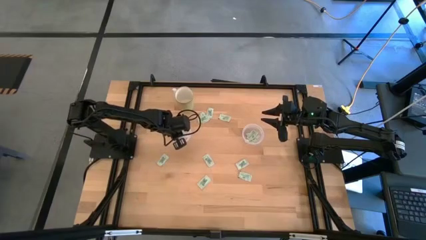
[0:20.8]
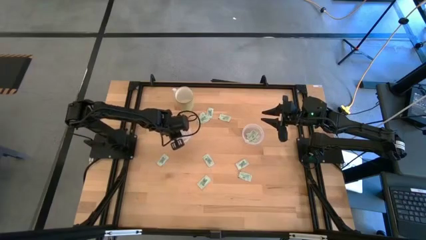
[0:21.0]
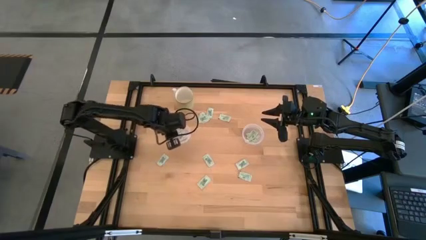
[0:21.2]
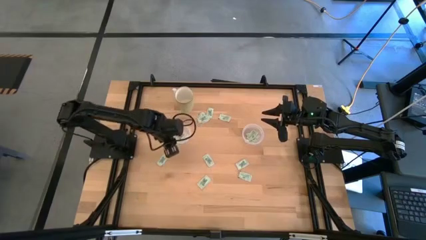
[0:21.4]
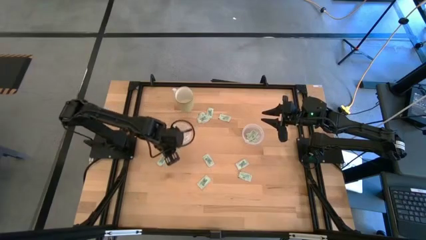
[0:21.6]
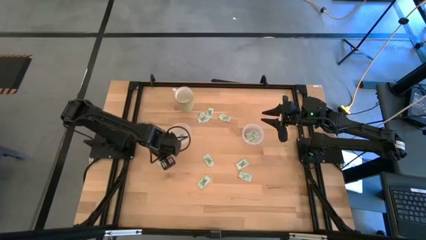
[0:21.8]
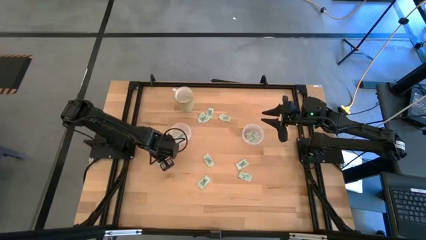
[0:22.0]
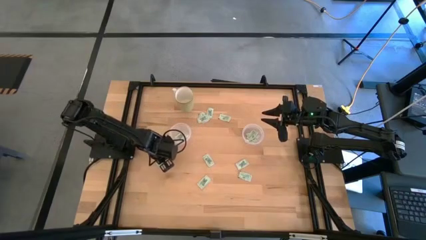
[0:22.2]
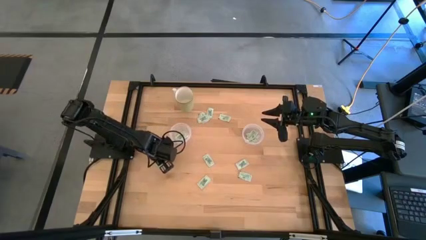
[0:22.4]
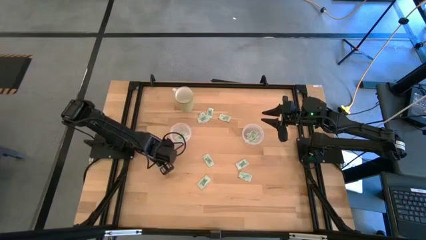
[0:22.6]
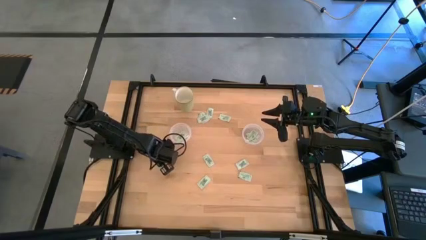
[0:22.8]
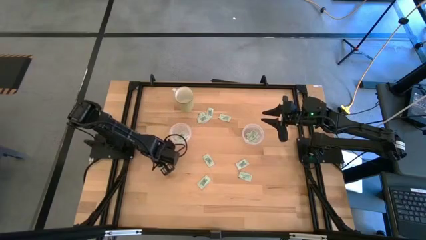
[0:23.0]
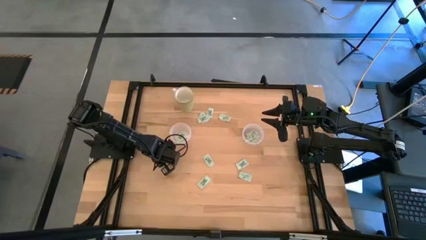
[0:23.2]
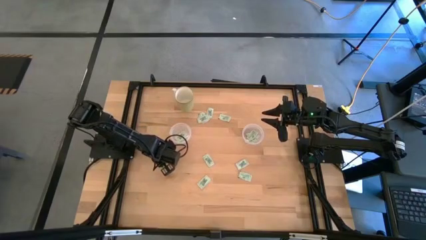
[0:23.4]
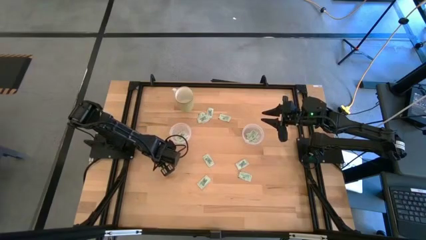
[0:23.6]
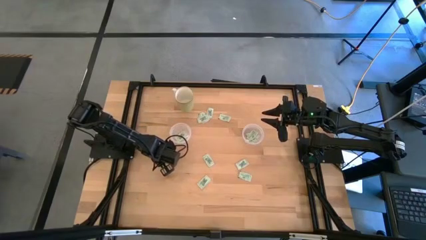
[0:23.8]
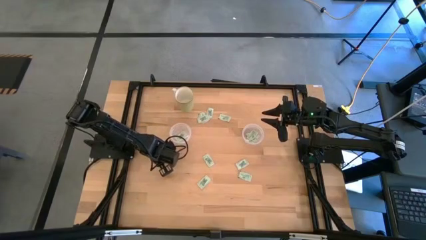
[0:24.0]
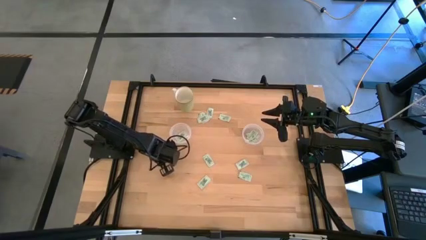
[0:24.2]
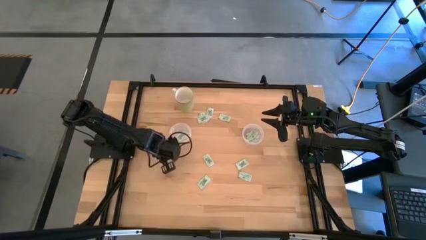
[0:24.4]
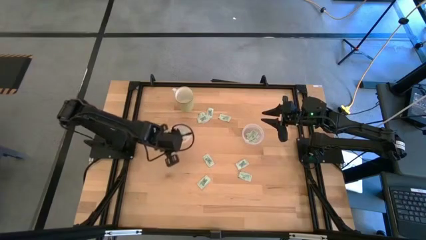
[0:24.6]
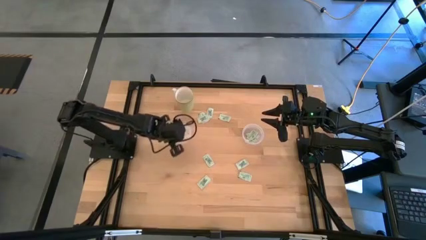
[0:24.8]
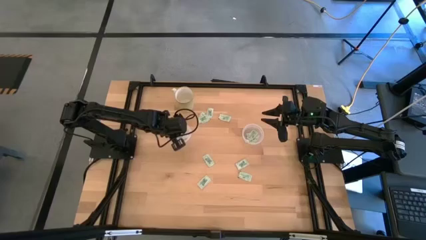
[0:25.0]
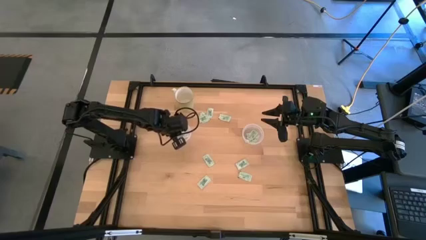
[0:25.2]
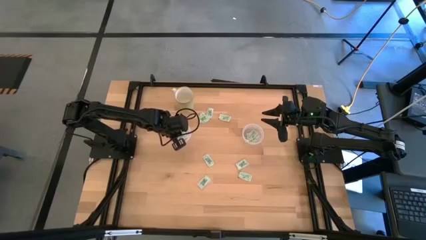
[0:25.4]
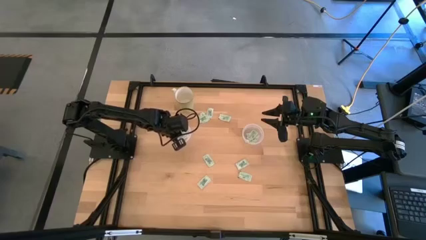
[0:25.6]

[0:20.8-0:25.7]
Task: Pick and place Stevia / Truvia into bins
Put the stevia packet into the left transparent container

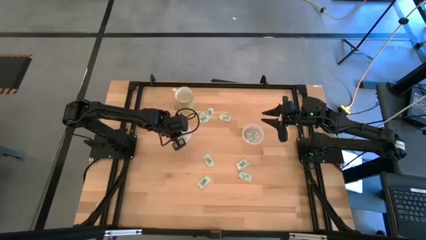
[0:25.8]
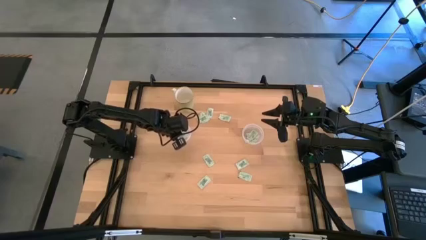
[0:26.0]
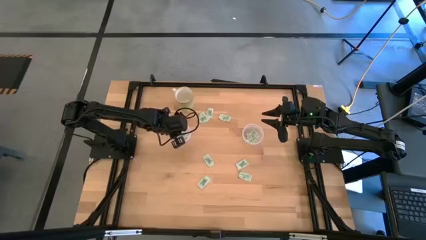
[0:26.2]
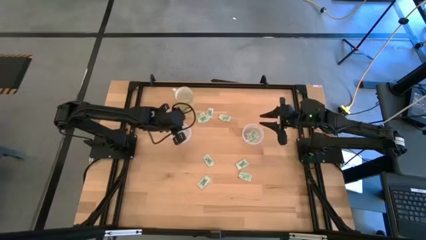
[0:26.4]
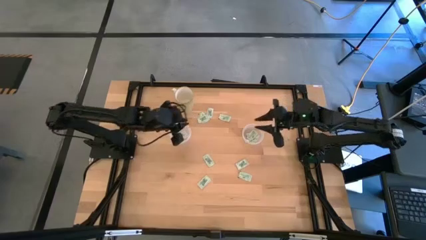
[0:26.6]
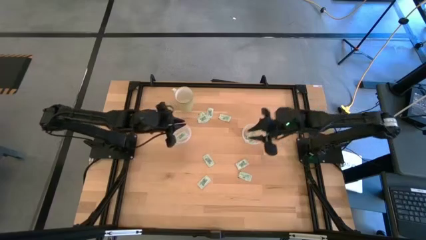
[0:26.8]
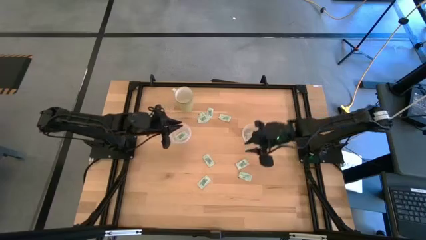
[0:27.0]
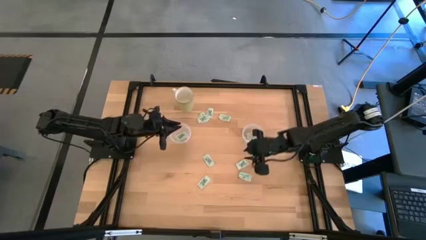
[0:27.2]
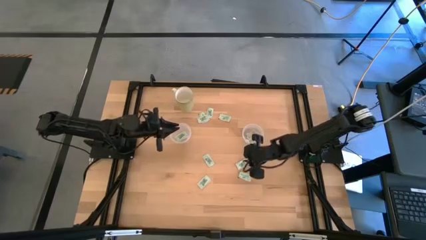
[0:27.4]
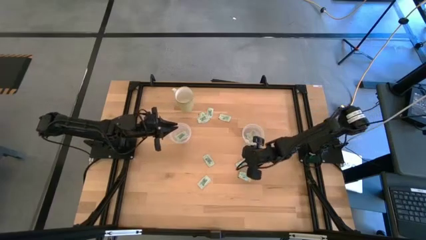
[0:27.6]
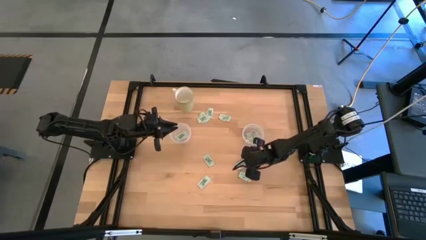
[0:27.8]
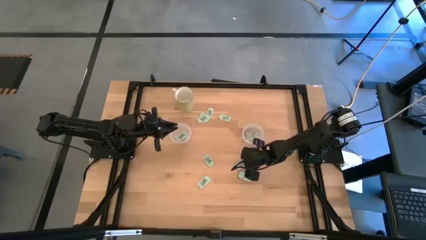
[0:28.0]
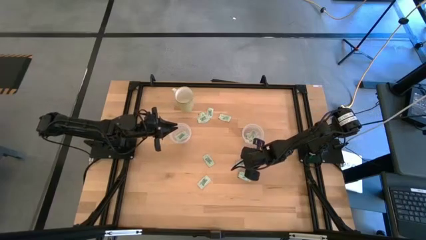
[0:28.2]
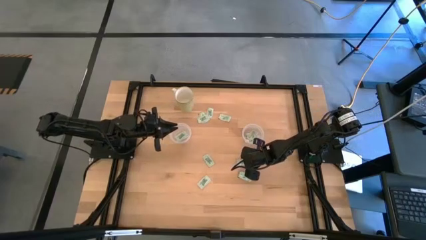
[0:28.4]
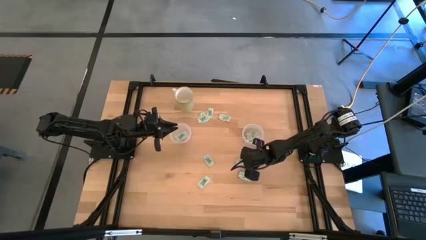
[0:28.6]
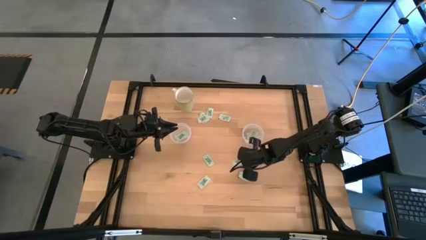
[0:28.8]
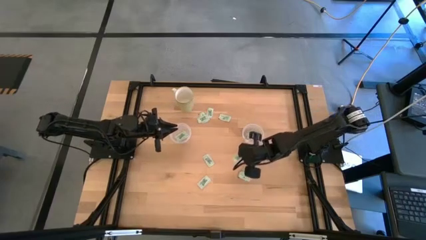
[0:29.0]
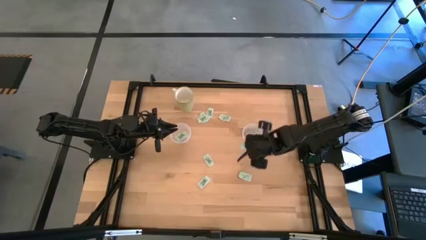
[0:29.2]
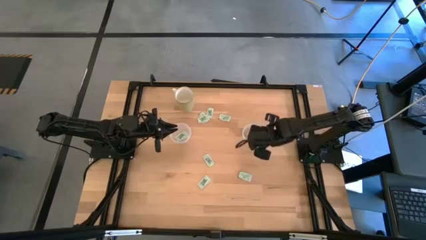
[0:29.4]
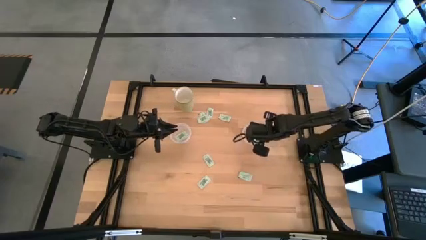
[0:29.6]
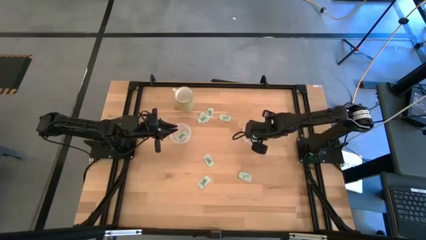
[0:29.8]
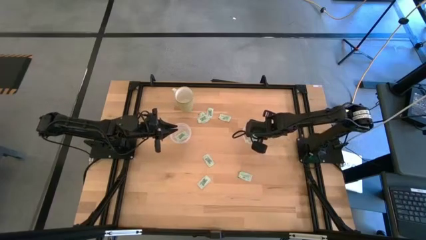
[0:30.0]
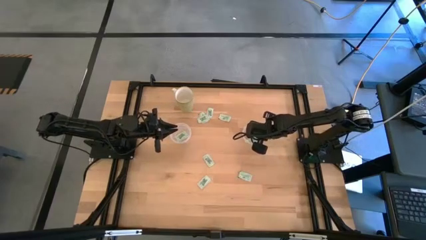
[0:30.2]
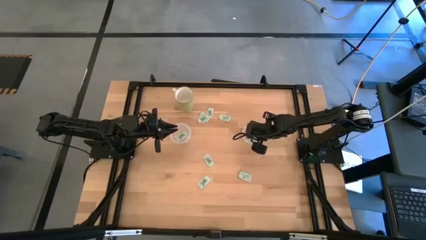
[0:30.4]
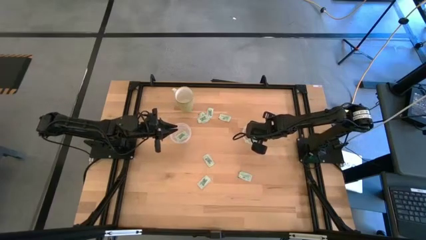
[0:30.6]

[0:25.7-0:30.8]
Put the stevia packet into the right transparent container

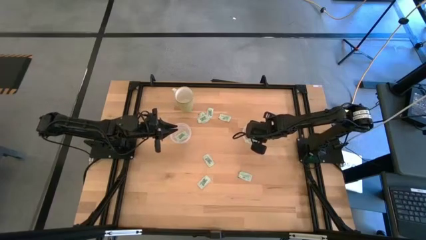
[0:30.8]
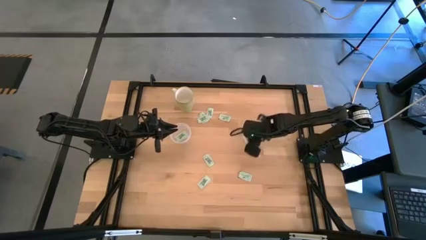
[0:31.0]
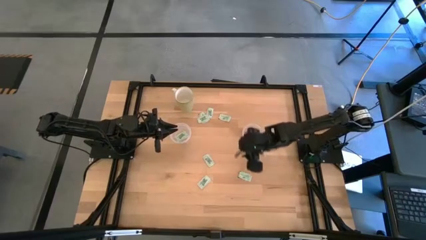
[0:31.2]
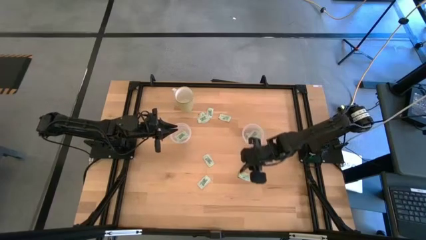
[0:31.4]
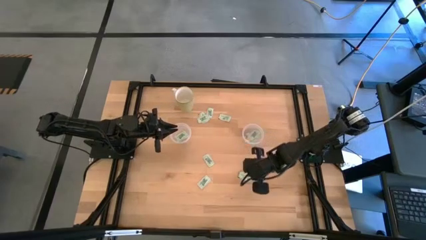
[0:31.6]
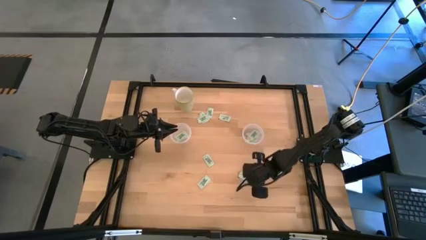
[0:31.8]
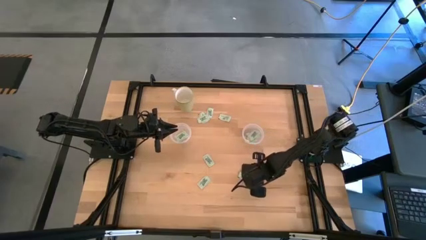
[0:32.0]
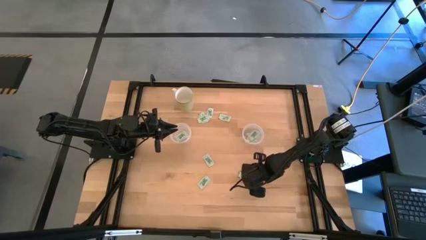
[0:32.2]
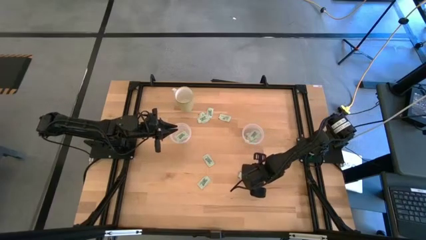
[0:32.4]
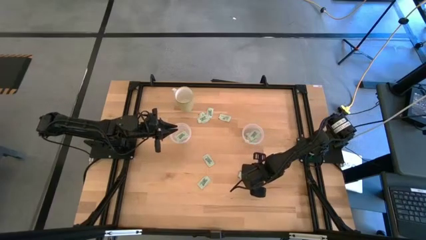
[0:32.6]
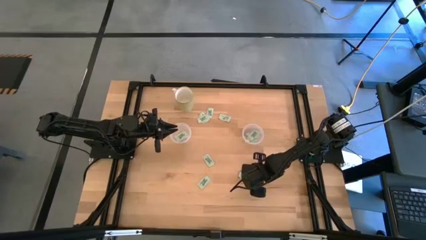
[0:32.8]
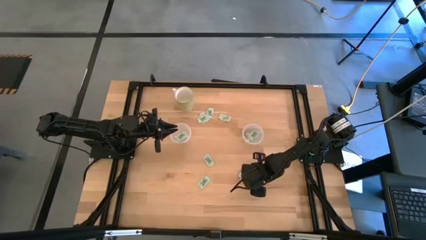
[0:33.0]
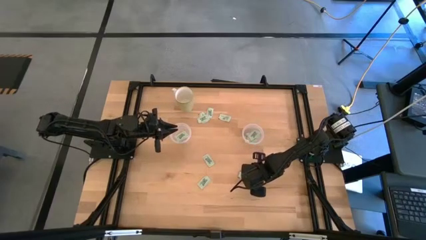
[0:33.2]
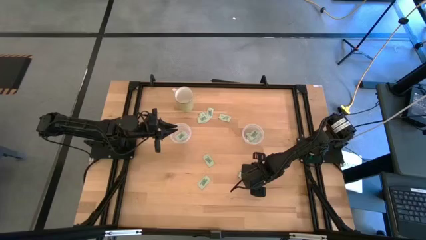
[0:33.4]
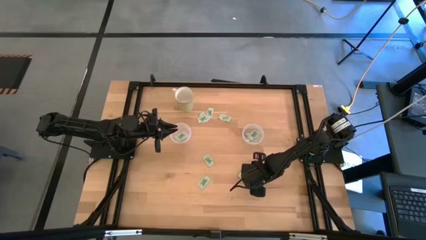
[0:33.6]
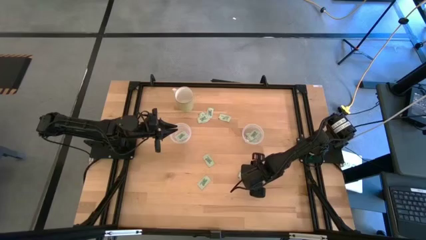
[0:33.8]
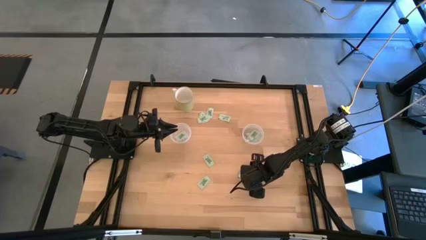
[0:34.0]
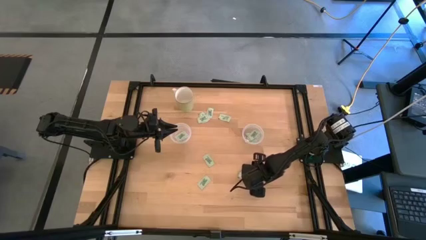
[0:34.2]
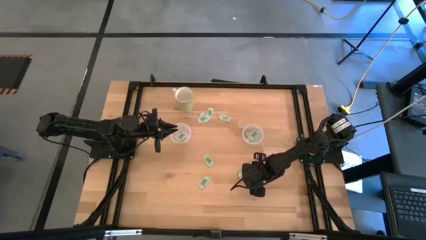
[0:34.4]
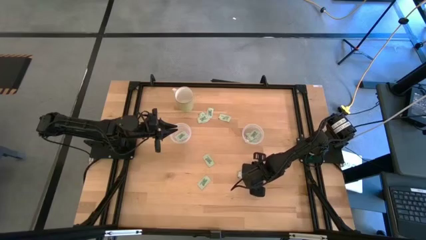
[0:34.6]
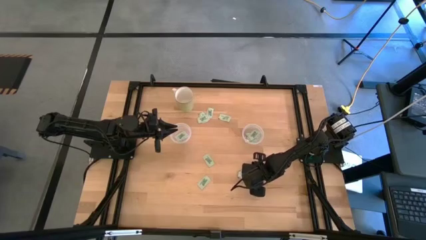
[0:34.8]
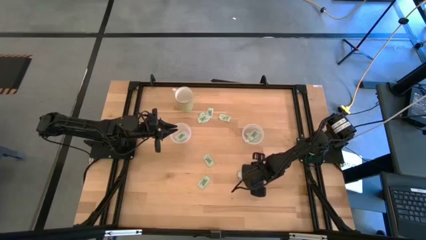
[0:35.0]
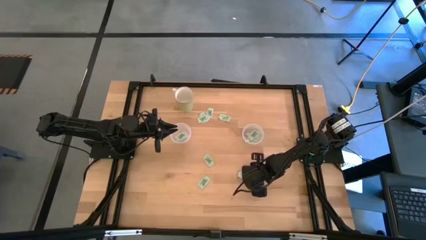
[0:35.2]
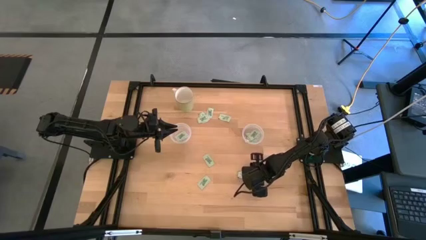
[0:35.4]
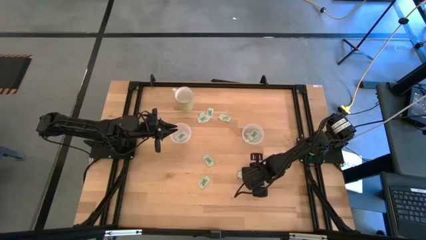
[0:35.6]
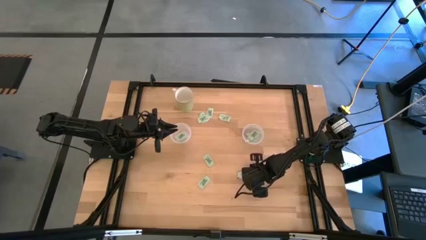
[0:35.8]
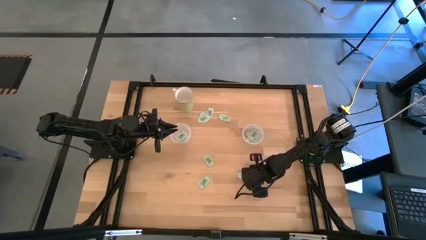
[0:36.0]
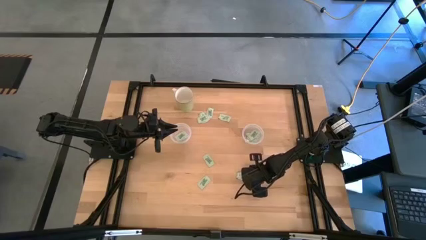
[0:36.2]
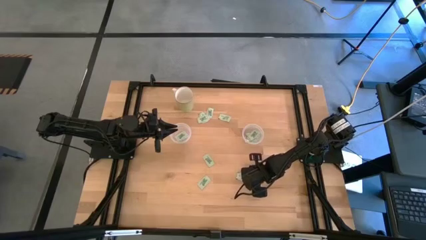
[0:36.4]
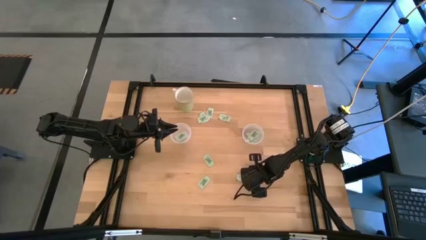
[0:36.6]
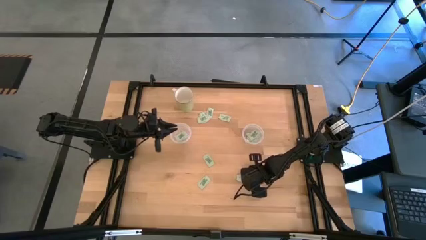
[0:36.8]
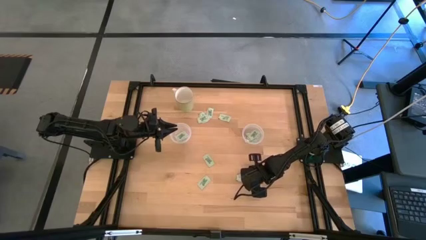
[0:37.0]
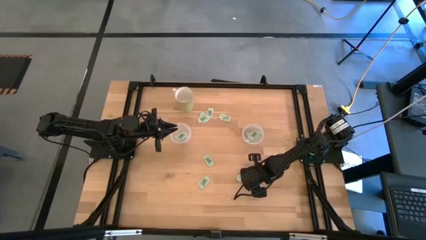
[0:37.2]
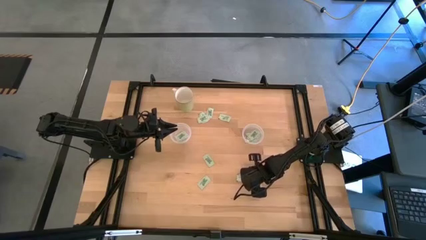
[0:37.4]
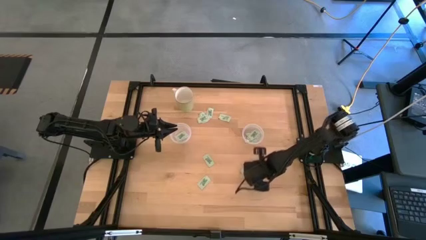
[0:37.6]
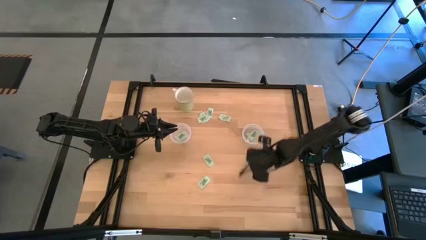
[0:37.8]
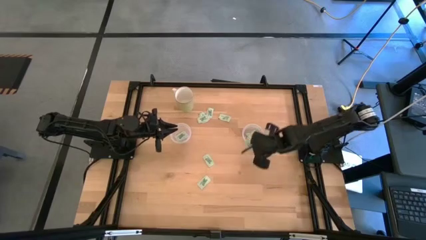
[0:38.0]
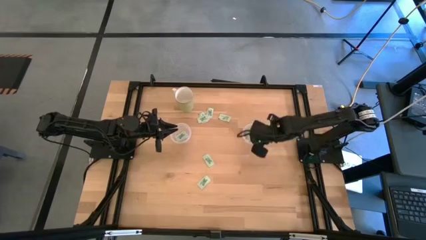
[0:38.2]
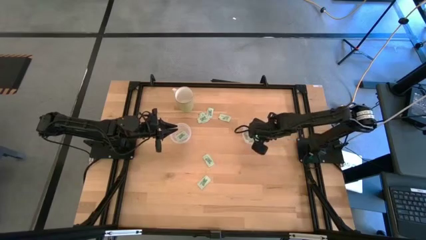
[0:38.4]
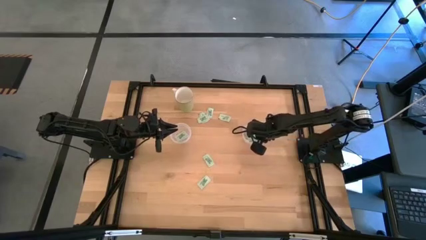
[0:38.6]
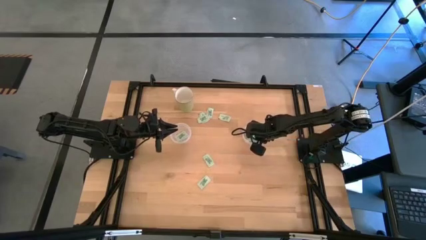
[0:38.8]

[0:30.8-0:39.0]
Put the stevia packet into the right transparent container
